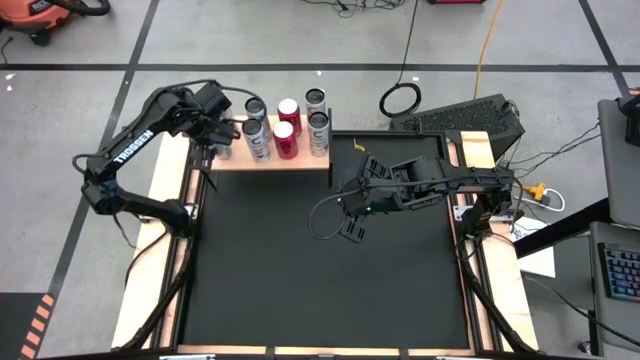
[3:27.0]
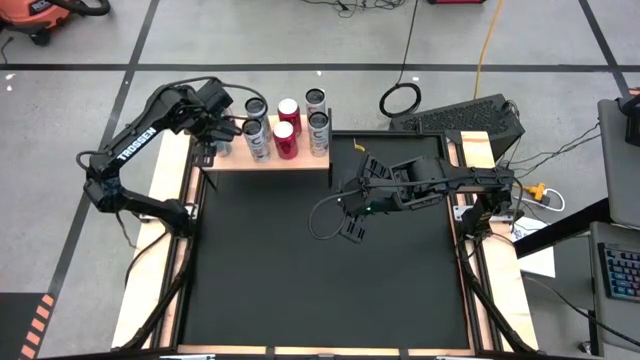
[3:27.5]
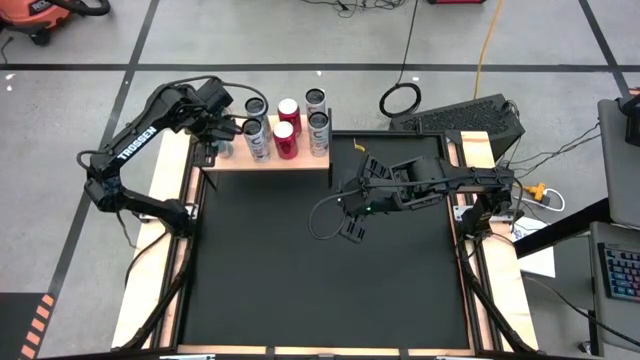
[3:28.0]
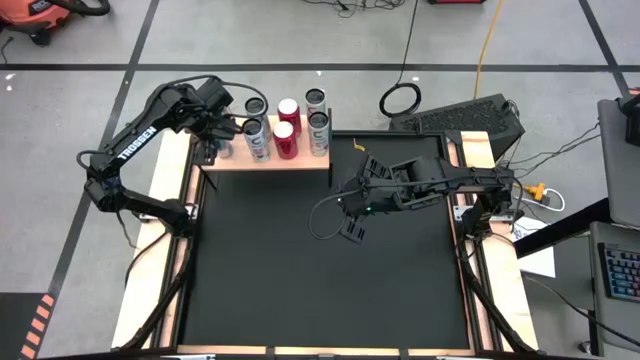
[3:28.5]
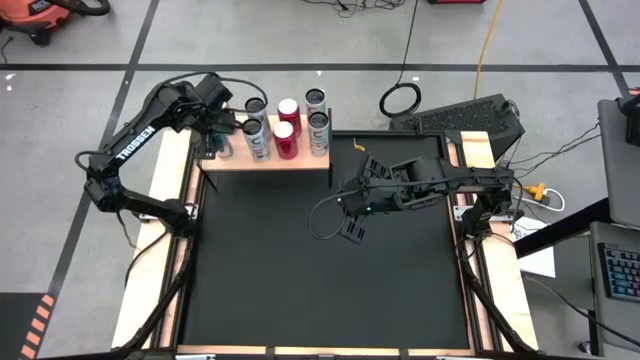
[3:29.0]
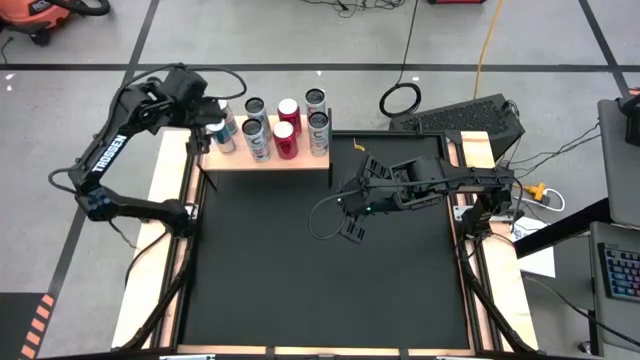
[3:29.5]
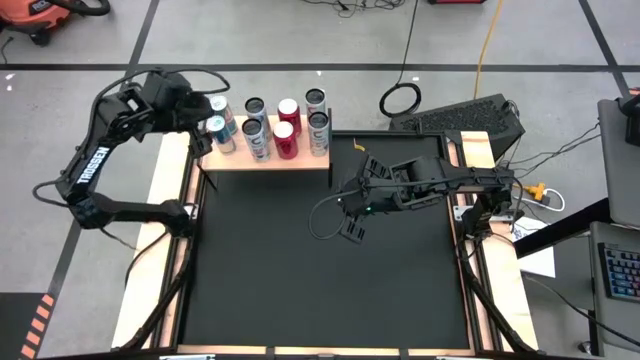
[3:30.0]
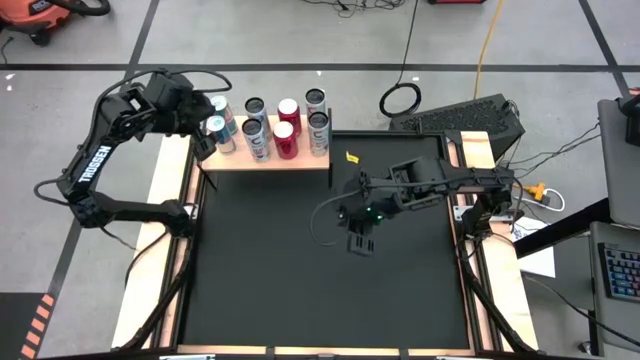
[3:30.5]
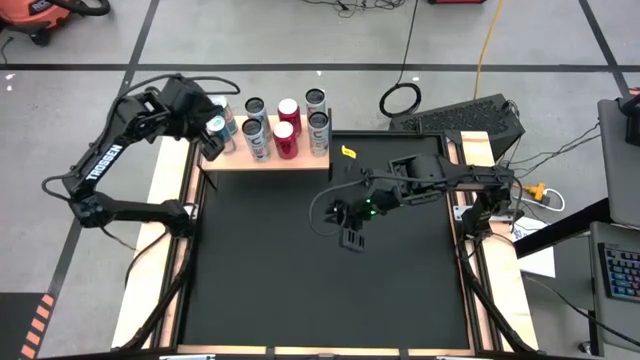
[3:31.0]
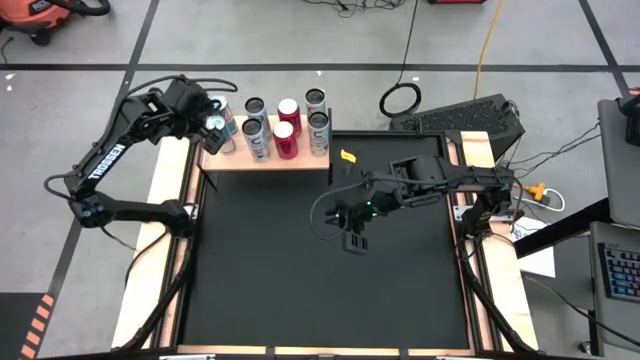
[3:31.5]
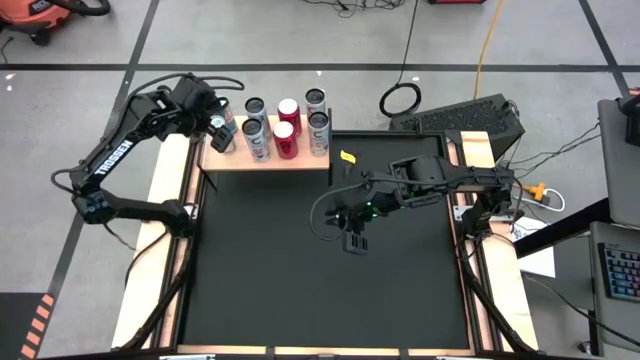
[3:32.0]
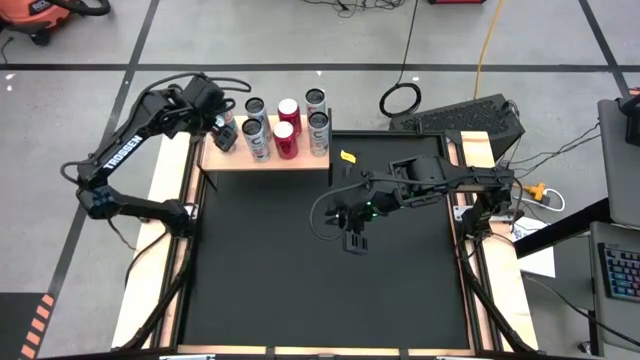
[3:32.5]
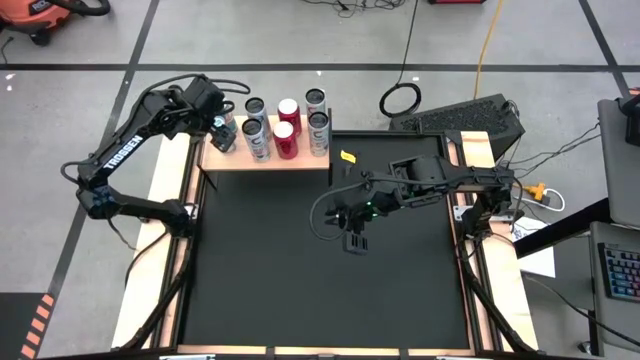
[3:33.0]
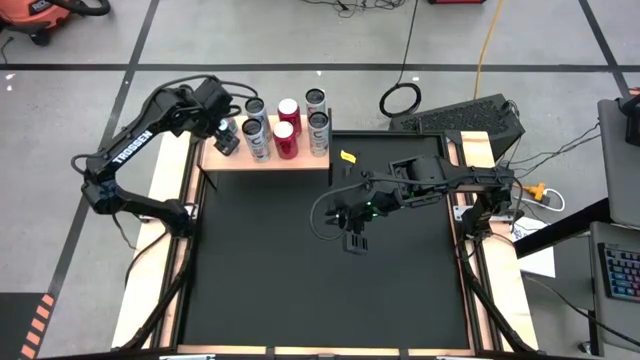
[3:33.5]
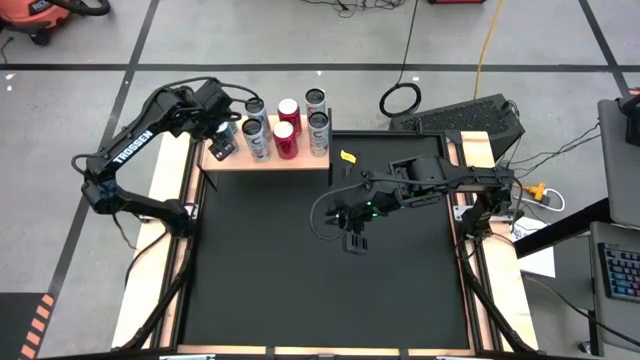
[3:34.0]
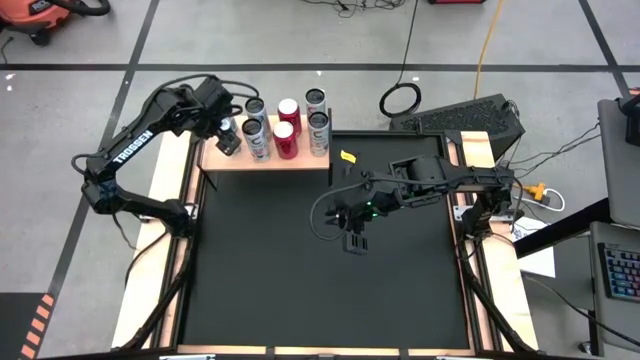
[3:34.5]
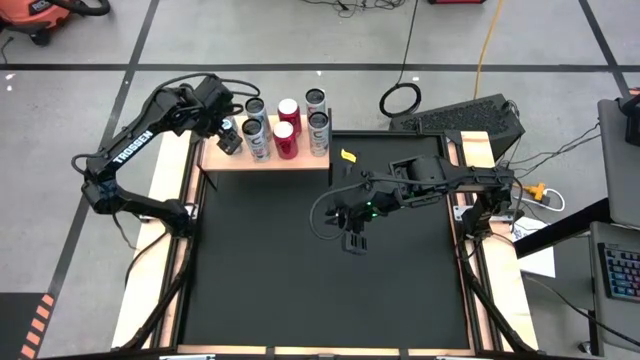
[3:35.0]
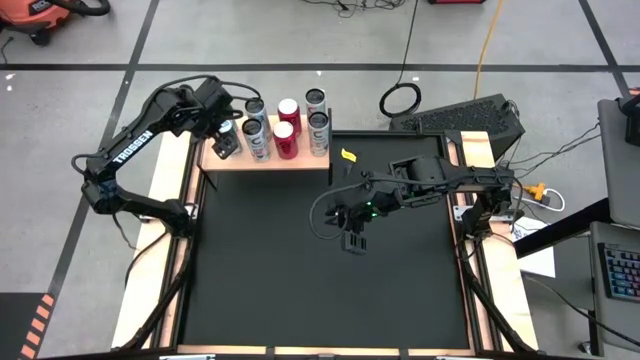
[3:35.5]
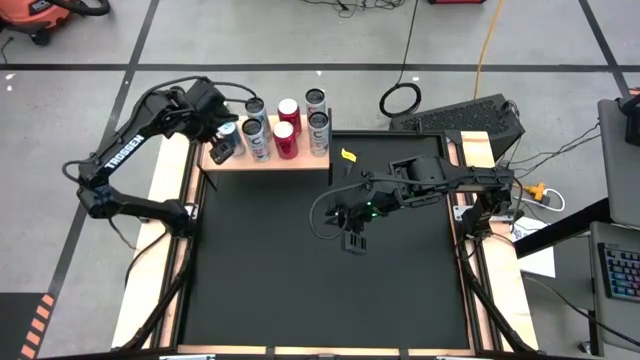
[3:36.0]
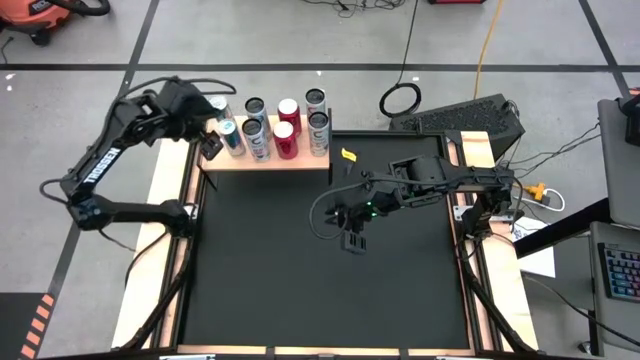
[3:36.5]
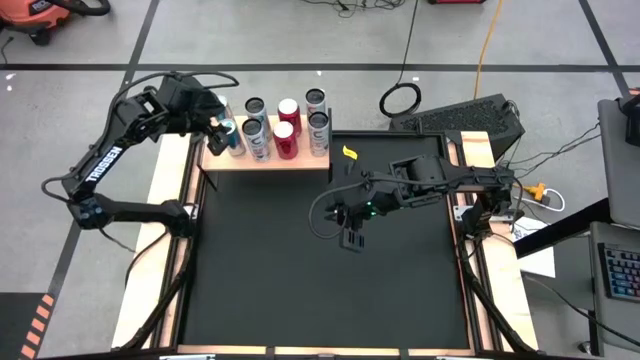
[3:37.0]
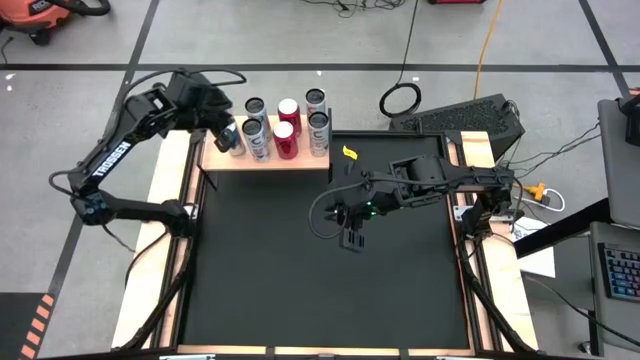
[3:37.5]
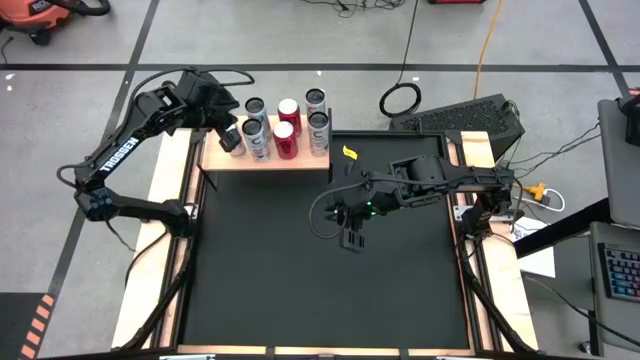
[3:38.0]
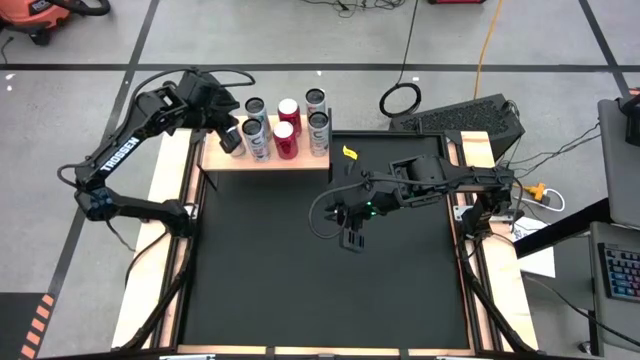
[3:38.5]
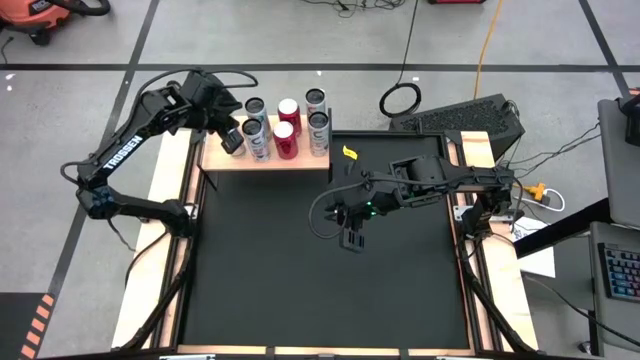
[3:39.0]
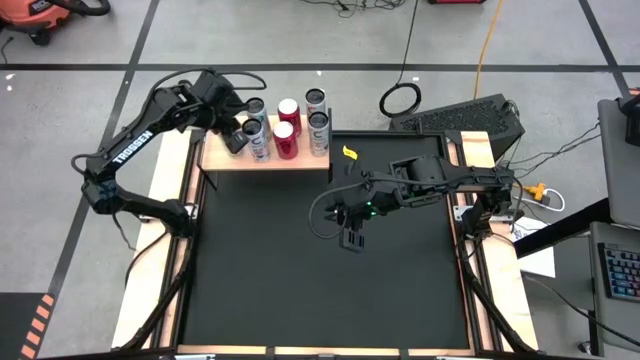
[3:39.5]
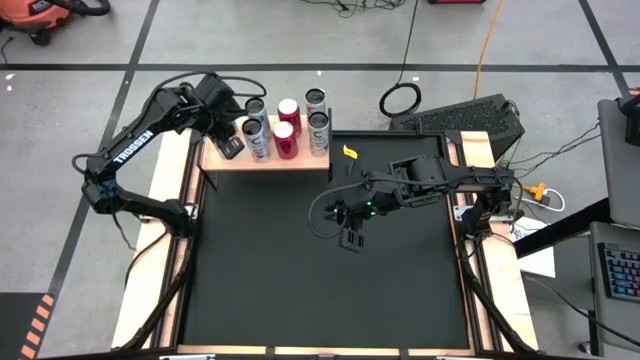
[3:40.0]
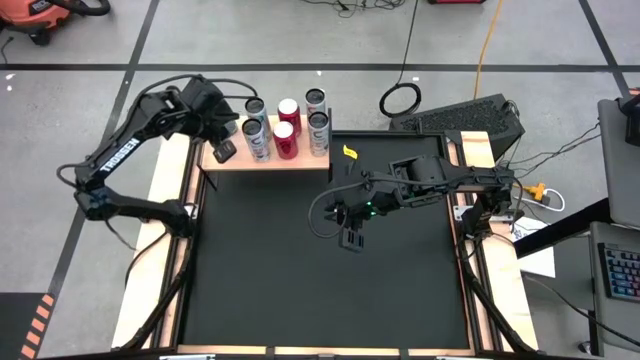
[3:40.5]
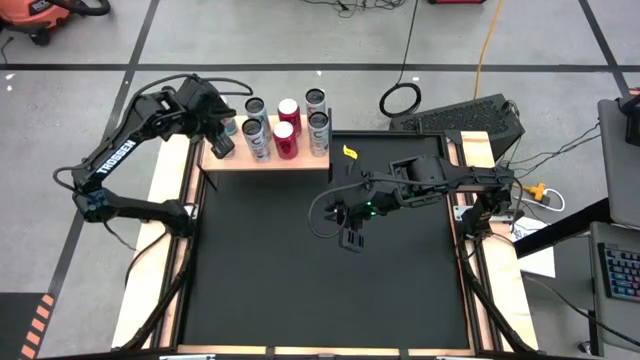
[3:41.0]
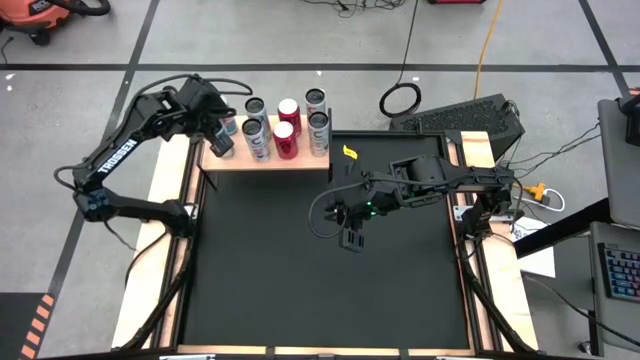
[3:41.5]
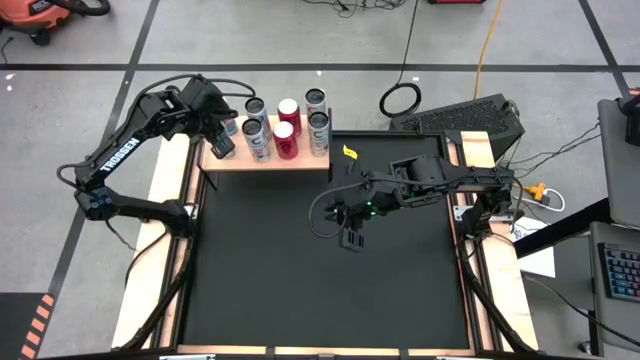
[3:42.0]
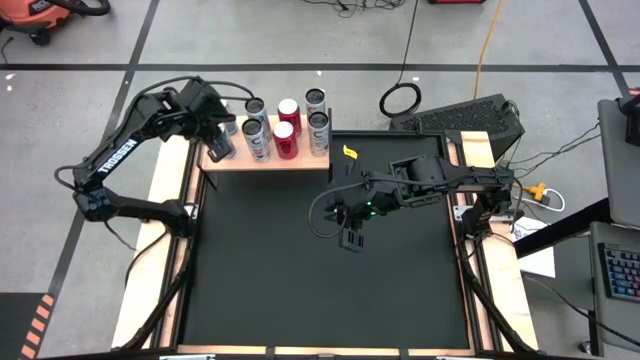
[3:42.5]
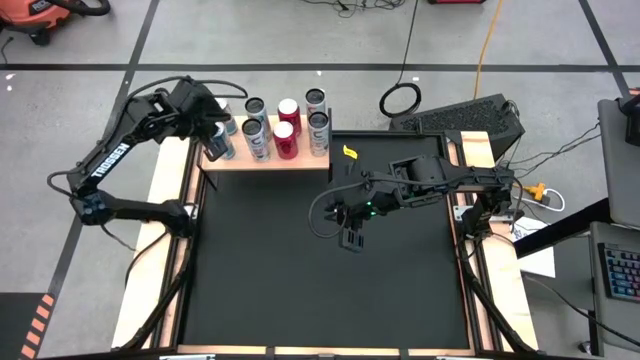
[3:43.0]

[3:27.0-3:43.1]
Task: Place canned beverage on shelf
Put the blue soda can on the shelf aligned with the other blue soda can
